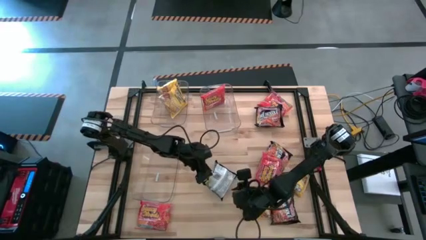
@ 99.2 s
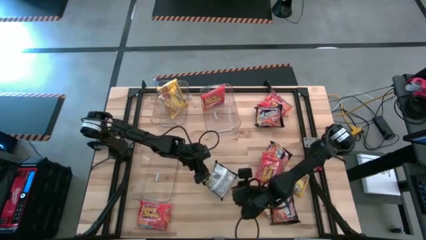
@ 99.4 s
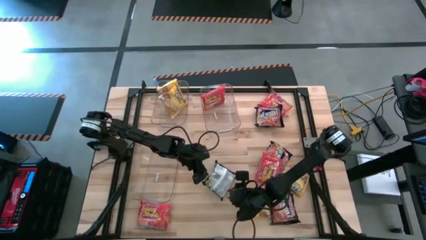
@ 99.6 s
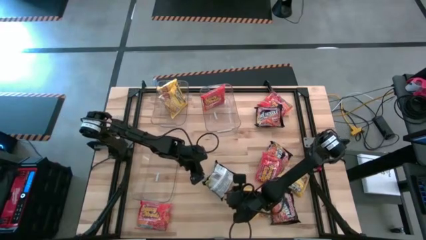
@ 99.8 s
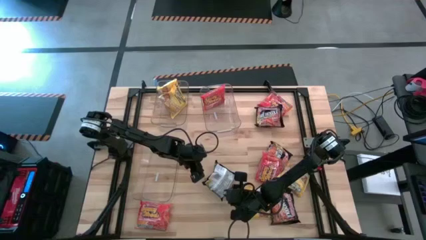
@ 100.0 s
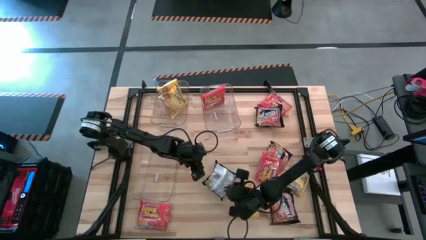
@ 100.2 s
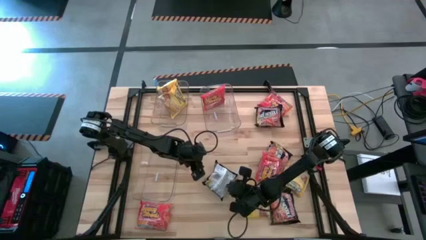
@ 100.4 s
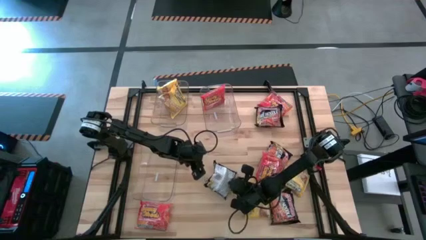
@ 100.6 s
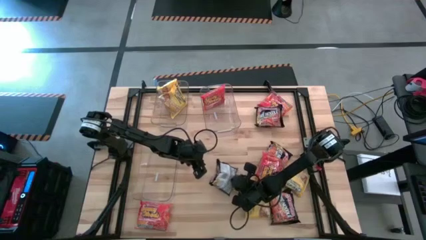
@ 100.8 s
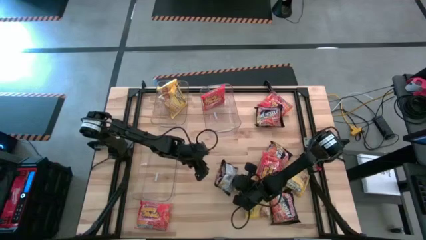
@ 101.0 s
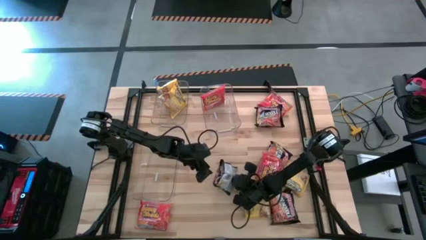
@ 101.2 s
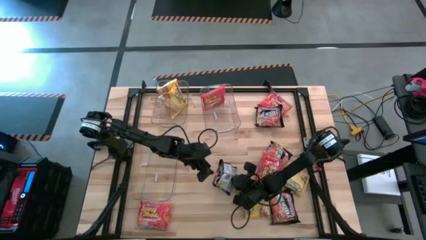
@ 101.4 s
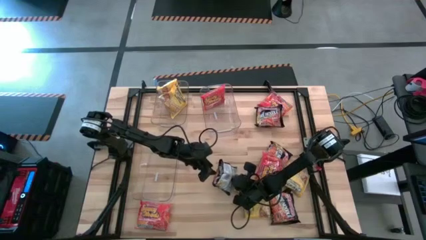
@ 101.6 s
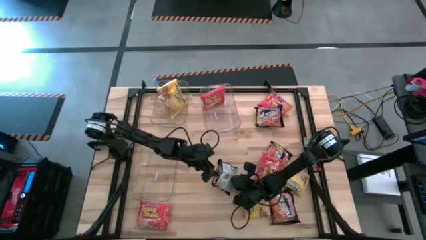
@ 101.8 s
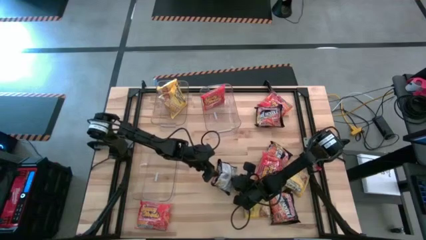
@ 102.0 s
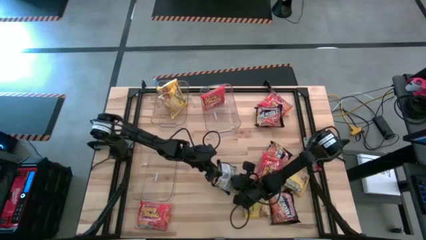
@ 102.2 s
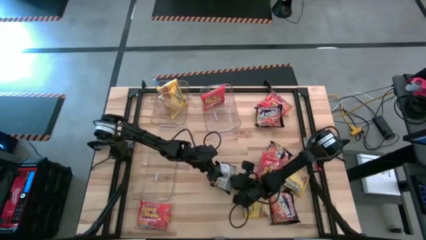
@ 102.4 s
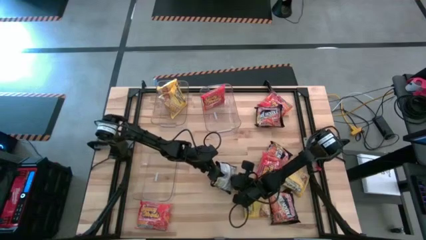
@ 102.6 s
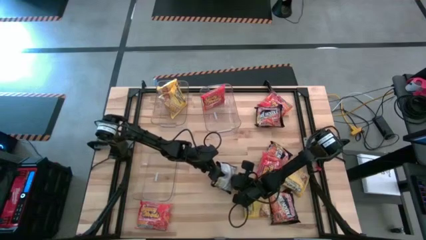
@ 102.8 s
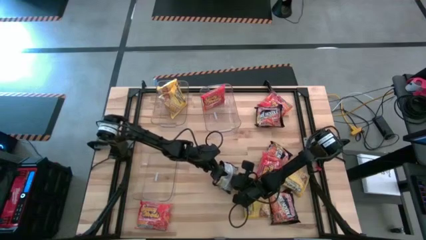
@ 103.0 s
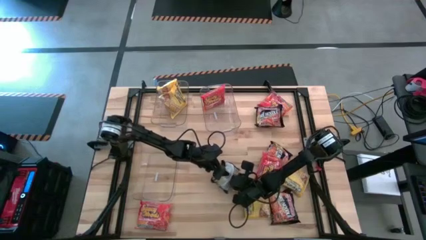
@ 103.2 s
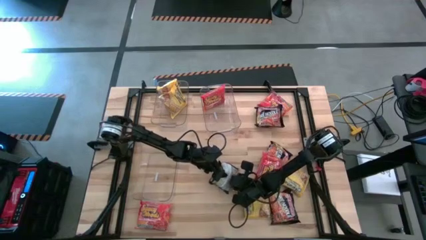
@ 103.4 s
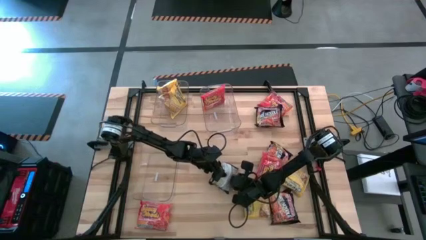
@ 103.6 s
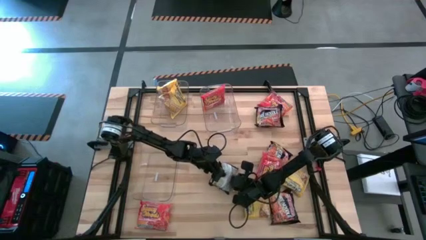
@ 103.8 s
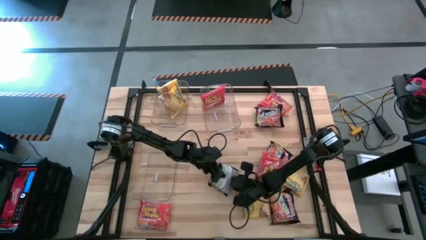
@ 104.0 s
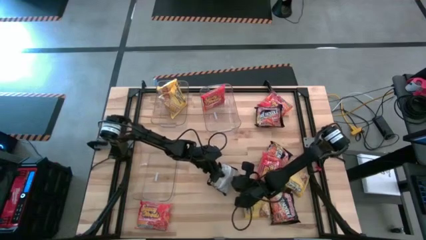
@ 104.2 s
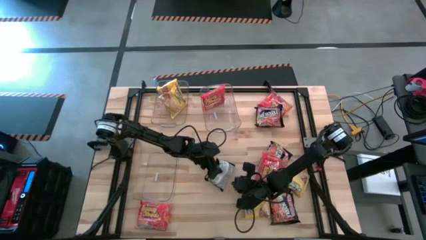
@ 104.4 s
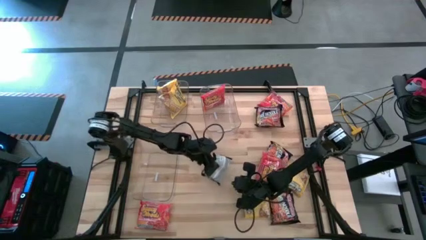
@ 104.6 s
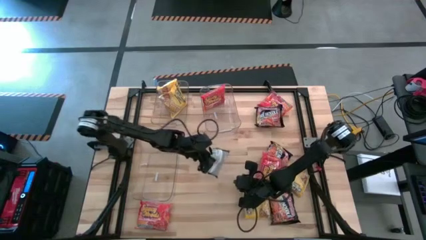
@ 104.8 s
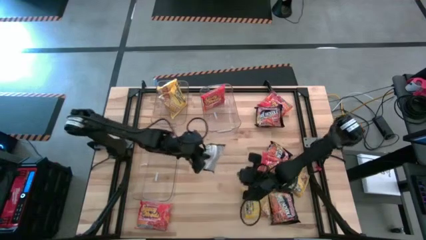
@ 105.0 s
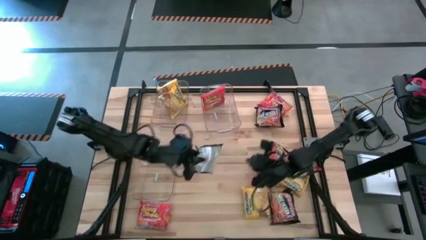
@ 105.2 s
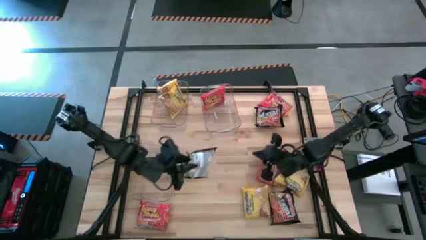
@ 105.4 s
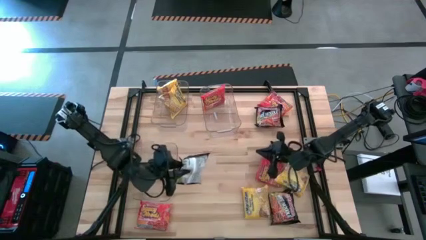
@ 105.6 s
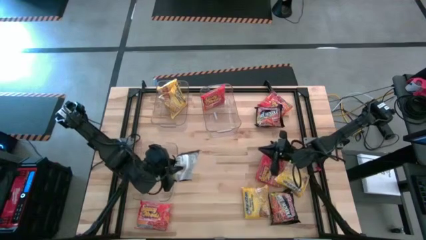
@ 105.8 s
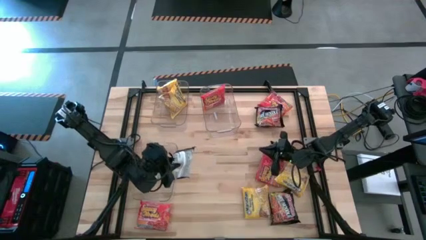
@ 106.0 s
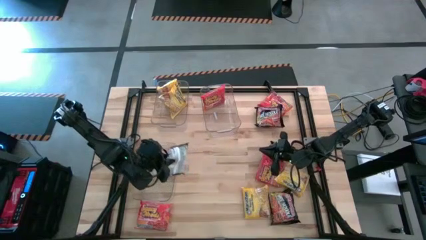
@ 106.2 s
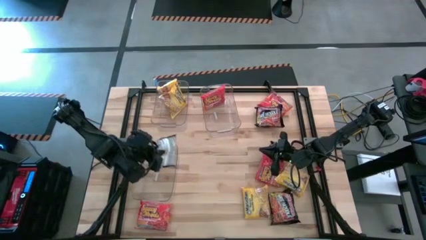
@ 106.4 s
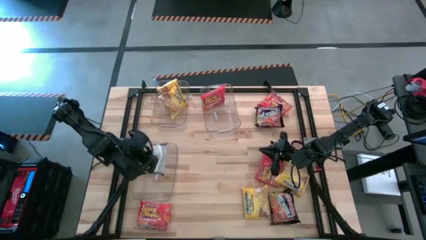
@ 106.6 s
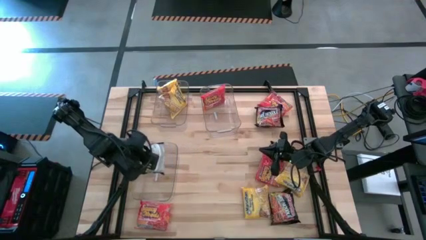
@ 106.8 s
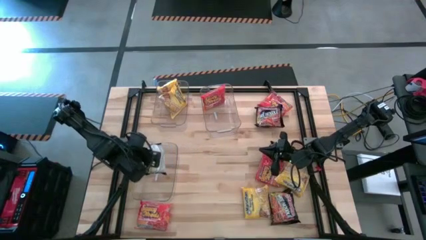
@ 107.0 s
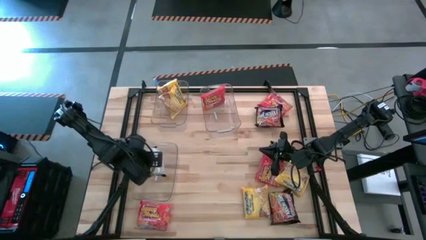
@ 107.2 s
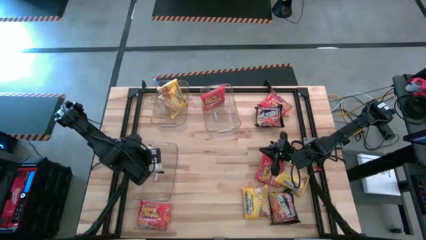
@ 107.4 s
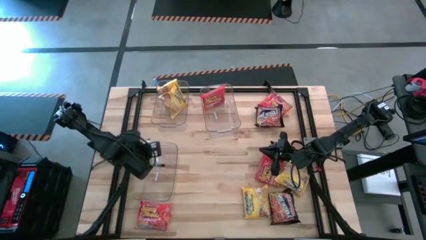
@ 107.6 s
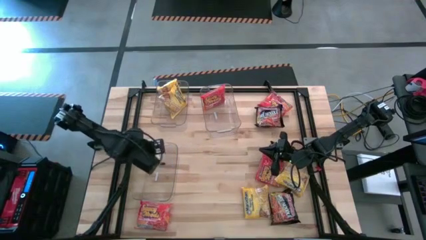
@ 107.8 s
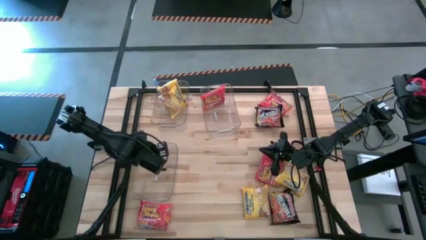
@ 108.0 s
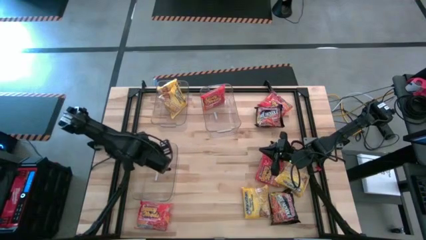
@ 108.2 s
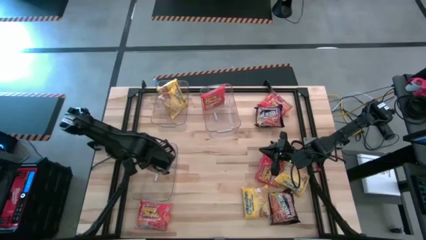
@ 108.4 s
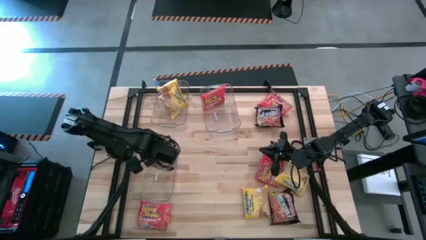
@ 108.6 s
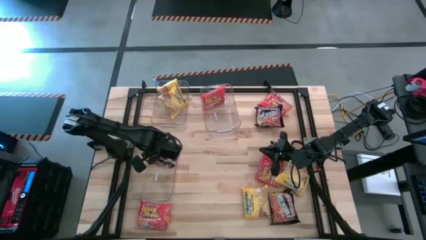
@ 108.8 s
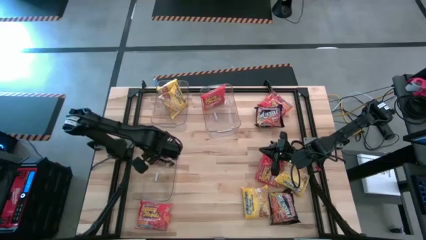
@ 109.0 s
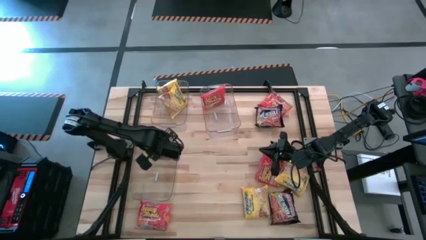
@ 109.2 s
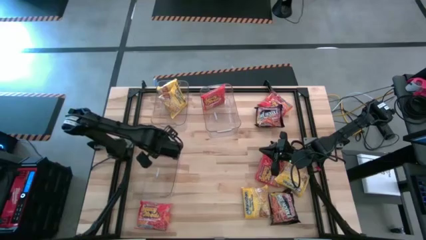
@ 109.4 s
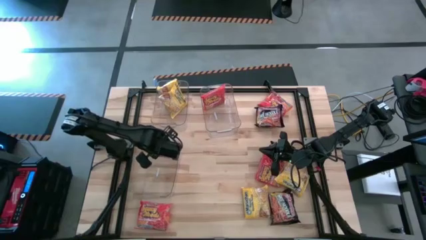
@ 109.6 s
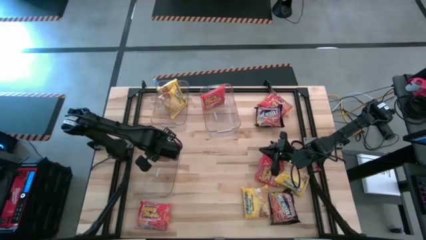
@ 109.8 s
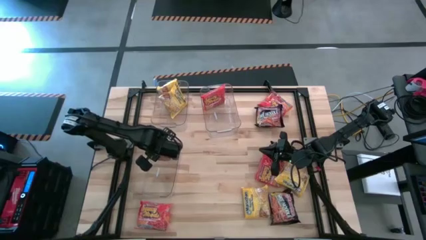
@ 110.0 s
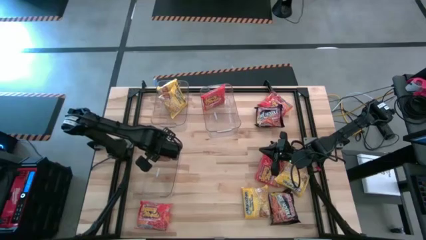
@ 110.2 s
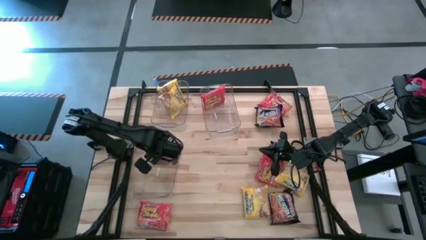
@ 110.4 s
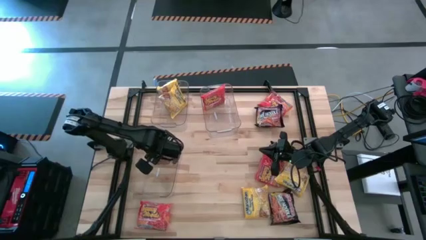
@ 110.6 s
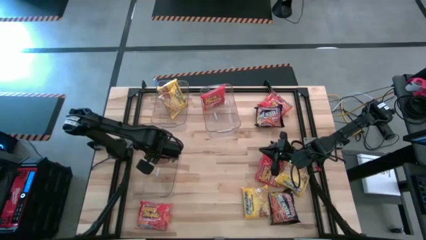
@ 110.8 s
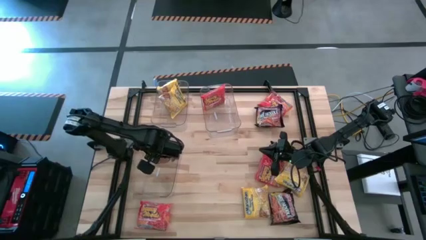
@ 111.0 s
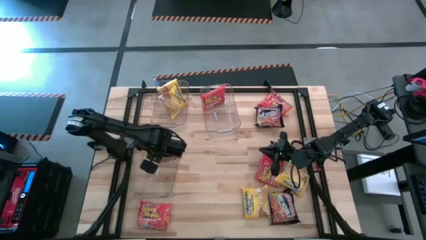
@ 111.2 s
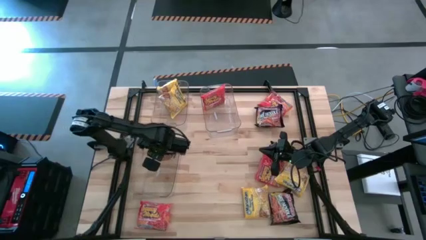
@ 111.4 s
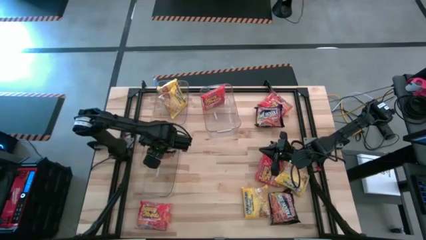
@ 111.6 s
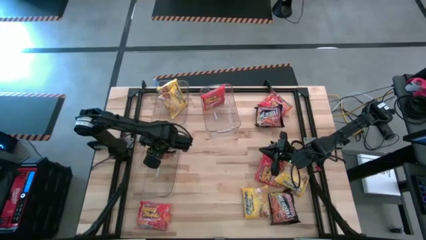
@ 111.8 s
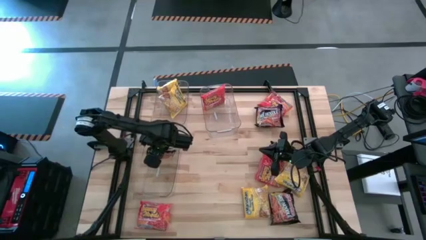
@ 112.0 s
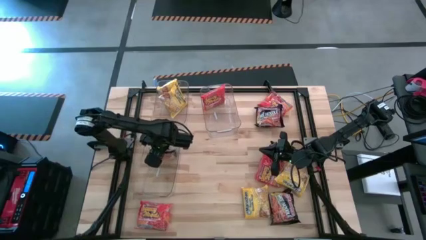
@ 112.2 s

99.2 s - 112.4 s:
Task: Sort Maruchan noodles
Put the black noodle pack into the bottom transparent bin

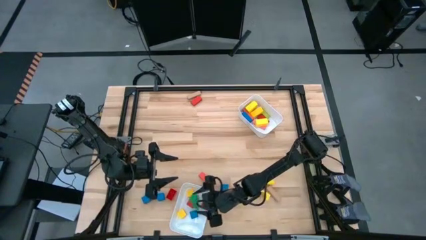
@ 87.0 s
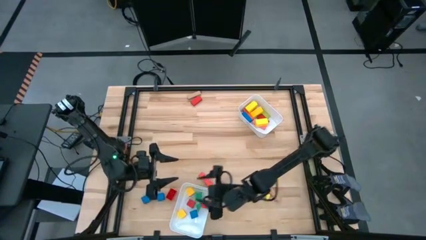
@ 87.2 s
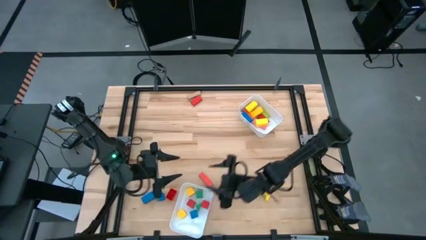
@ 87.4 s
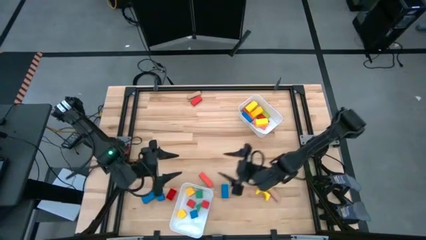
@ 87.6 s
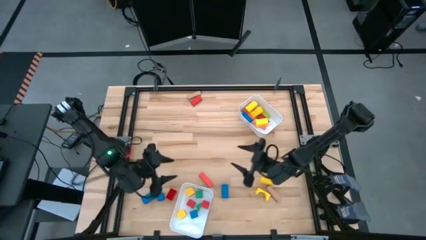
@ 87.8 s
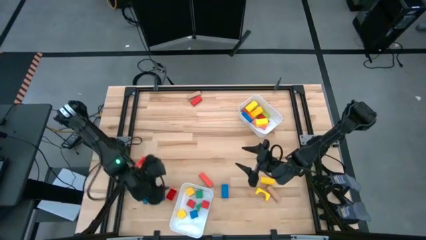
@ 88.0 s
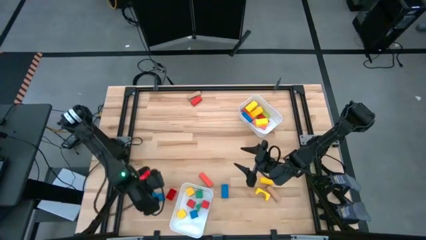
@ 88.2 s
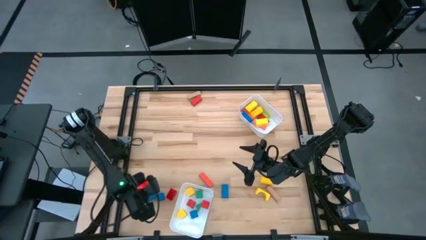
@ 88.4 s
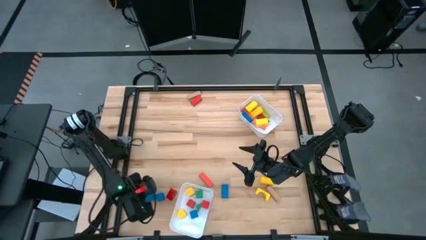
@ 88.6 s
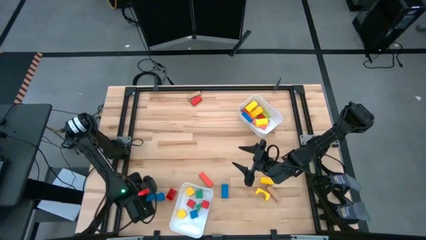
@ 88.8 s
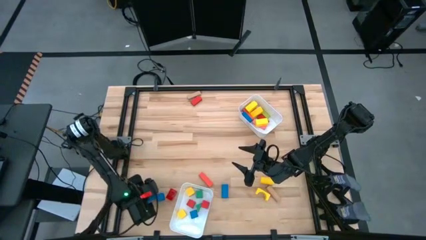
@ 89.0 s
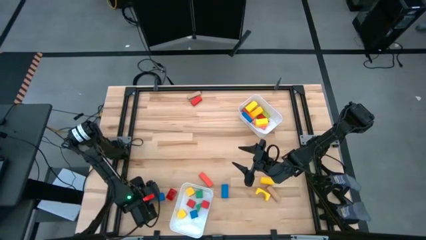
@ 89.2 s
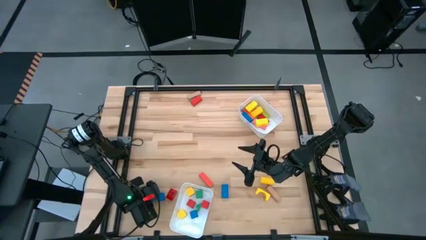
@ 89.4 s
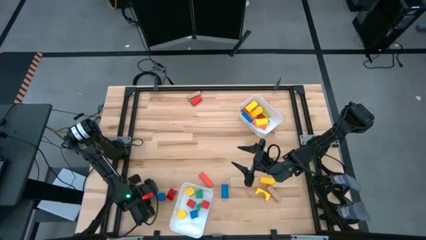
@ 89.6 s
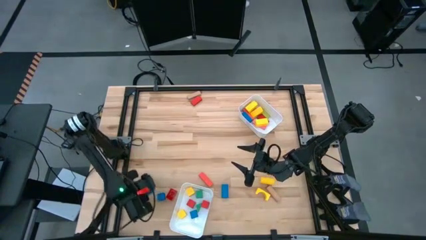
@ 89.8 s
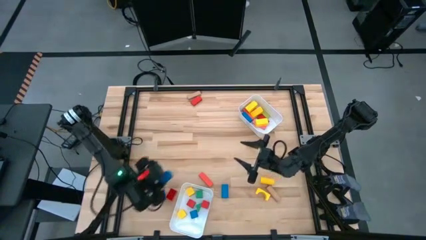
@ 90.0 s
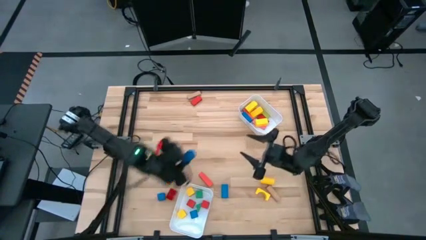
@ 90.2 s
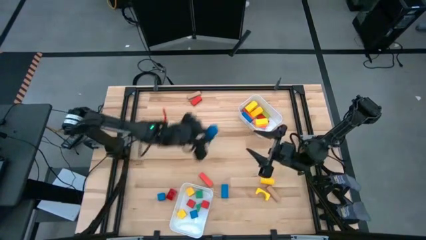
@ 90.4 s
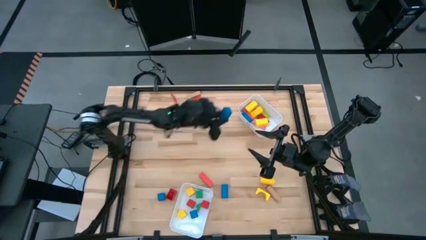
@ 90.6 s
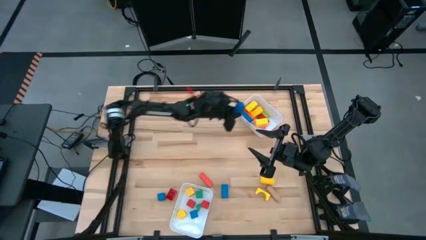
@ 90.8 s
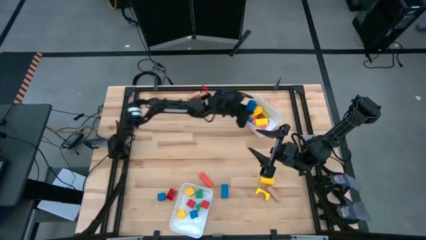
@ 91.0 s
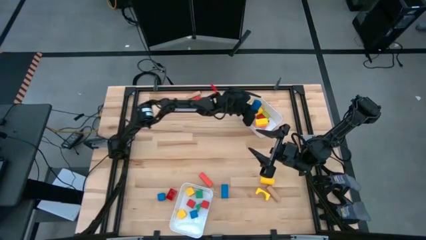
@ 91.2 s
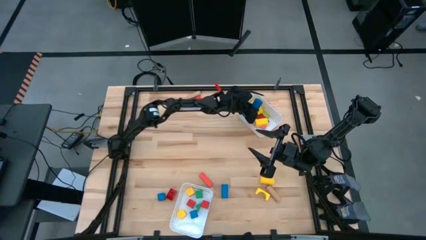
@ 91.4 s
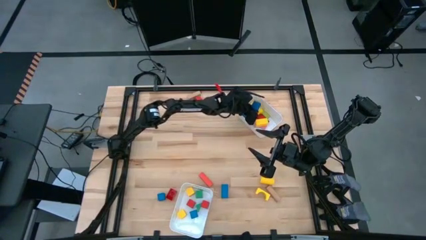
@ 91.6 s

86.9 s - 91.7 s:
Task: Sort blocks by size
Put the blue rectangle block into the top white bin
